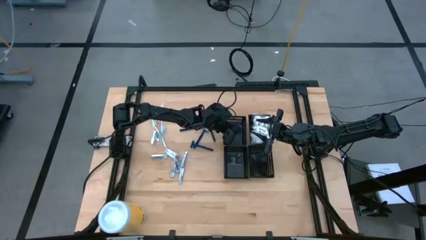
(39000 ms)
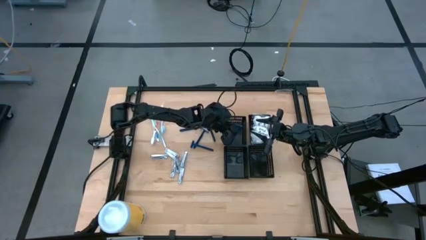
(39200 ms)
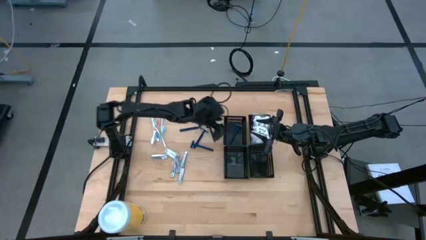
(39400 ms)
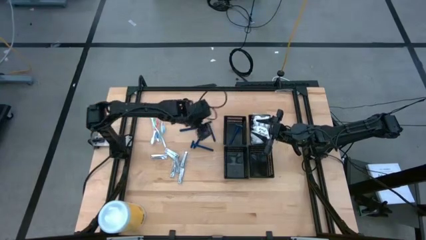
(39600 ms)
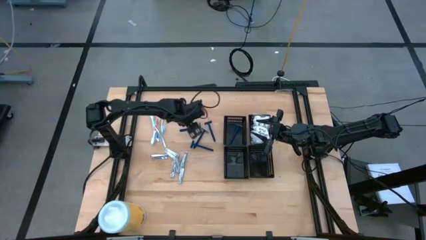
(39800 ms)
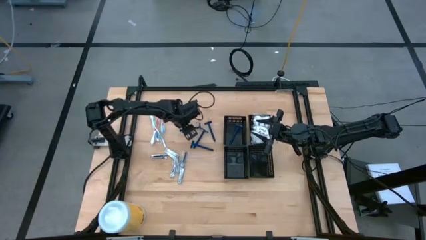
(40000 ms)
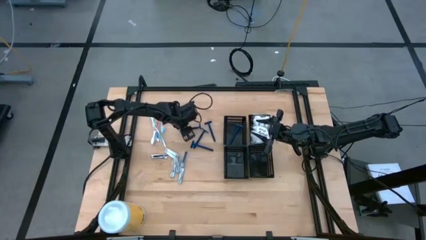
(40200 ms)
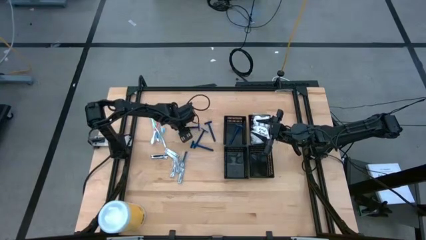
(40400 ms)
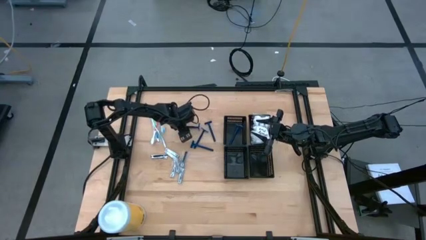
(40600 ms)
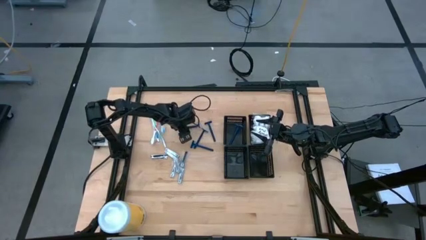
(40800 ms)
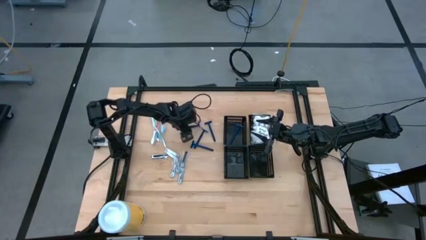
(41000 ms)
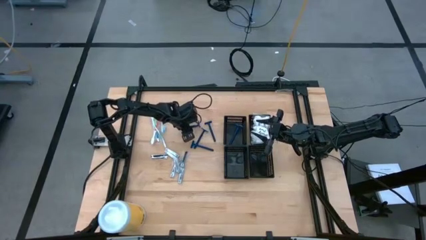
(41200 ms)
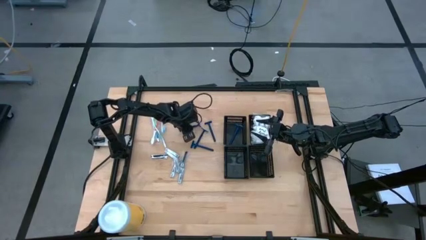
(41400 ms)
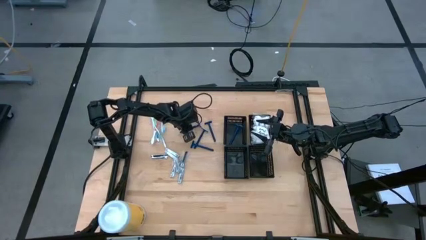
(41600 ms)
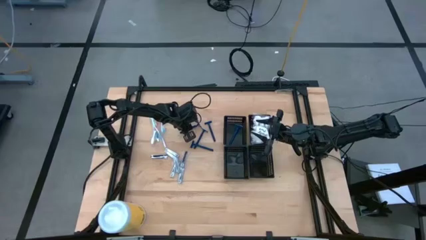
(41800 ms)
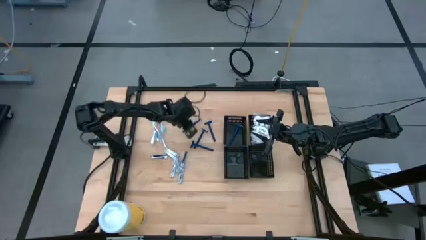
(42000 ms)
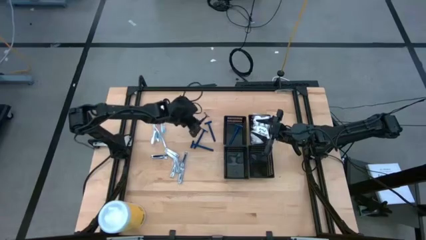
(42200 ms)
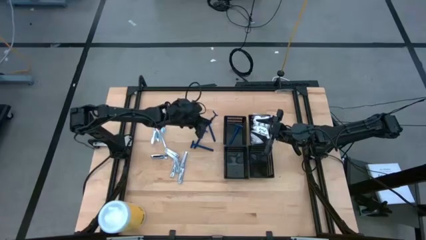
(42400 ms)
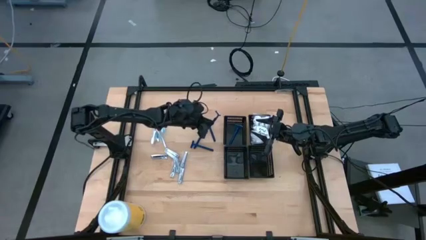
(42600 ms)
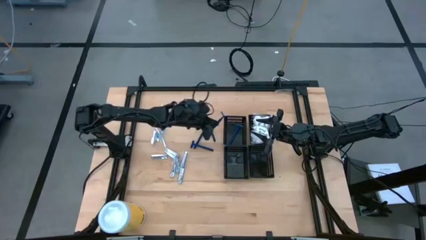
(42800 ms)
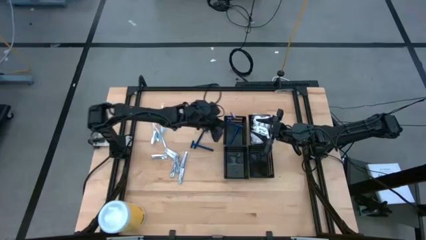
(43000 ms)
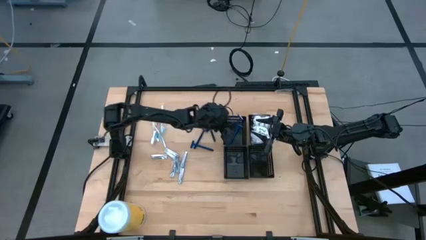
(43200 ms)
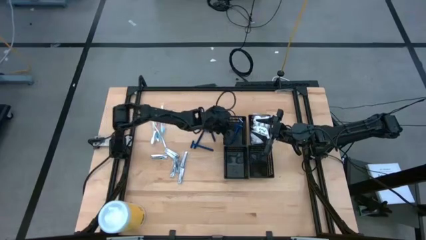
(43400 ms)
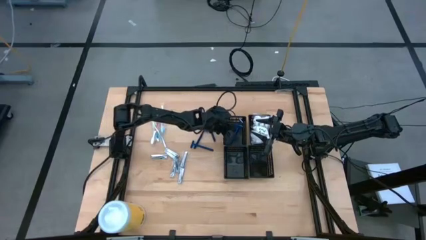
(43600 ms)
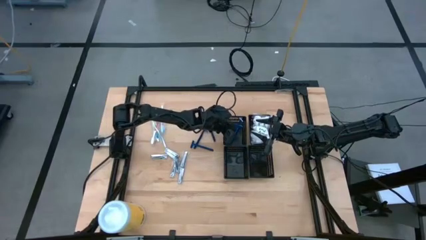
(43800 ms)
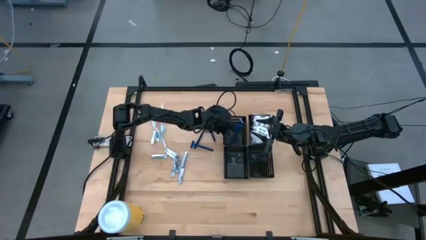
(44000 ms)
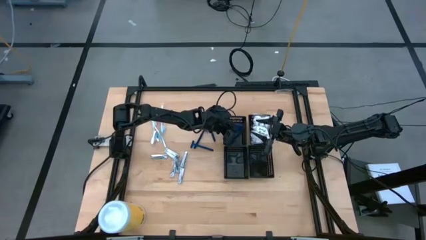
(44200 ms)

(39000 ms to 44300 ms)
Task: Pick & Place Travel size toiletries
Put the razor into the top left black basket

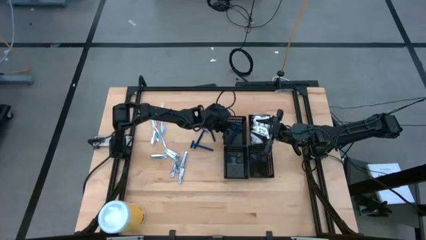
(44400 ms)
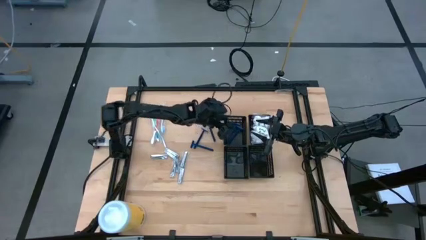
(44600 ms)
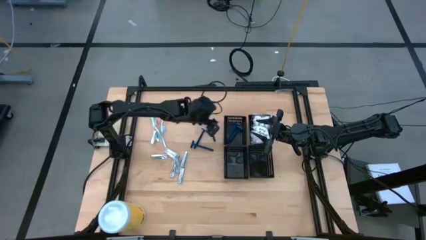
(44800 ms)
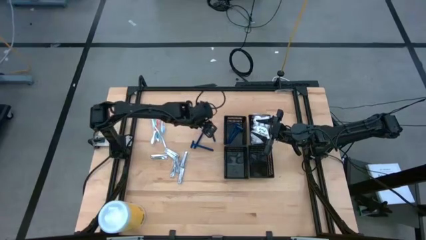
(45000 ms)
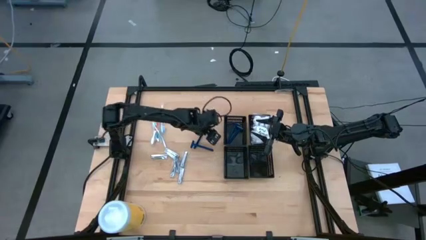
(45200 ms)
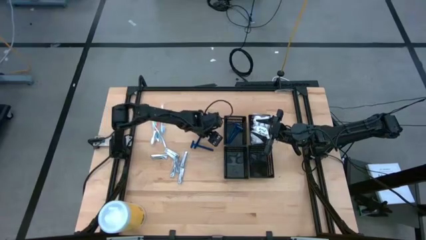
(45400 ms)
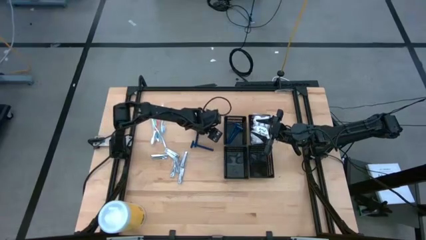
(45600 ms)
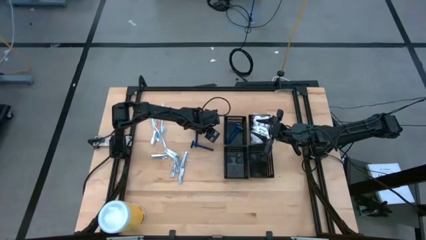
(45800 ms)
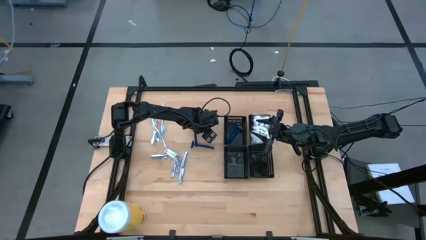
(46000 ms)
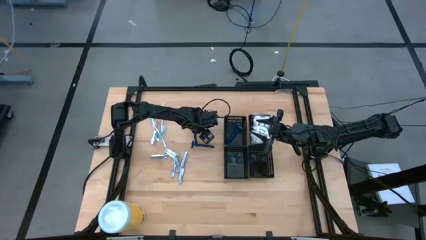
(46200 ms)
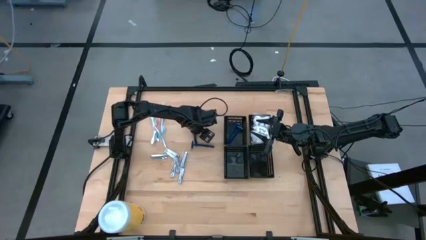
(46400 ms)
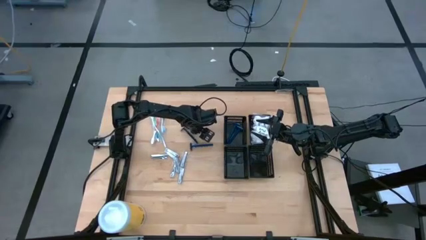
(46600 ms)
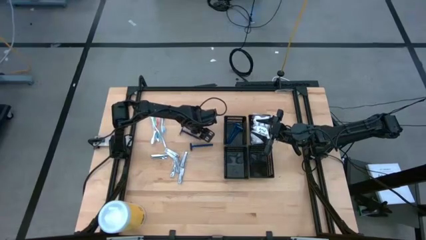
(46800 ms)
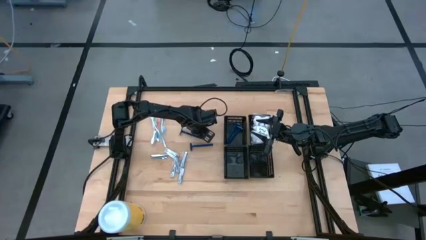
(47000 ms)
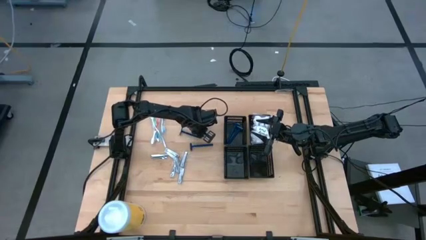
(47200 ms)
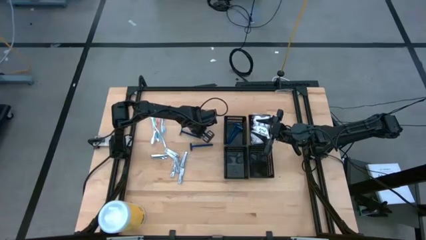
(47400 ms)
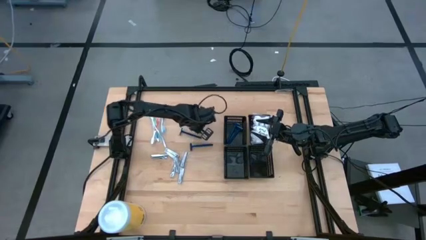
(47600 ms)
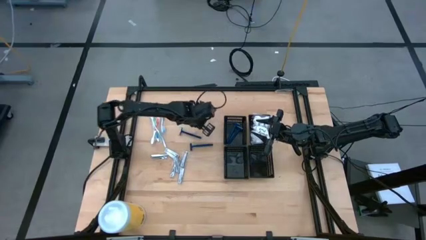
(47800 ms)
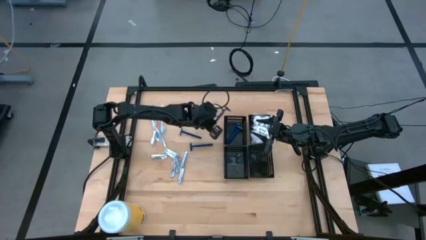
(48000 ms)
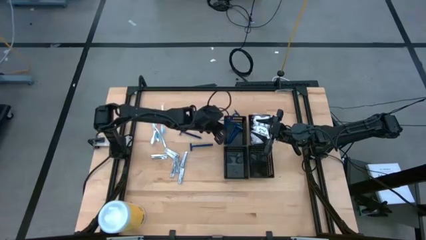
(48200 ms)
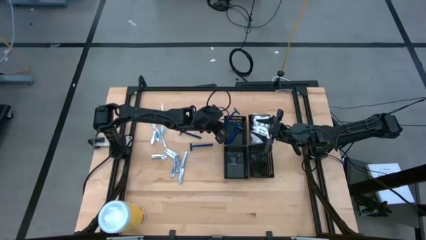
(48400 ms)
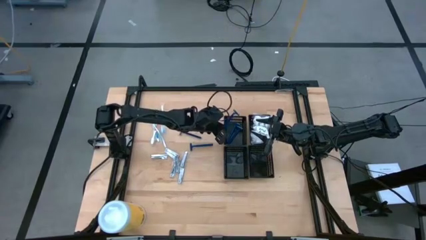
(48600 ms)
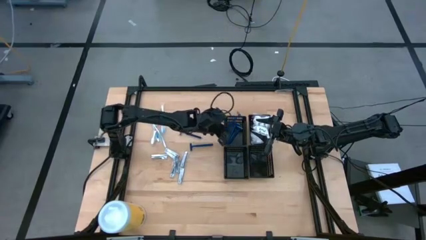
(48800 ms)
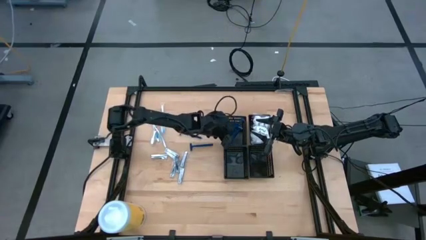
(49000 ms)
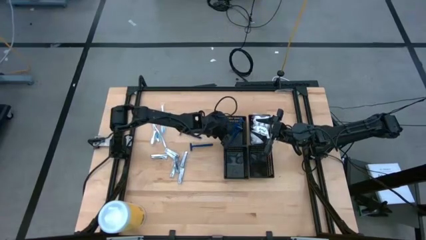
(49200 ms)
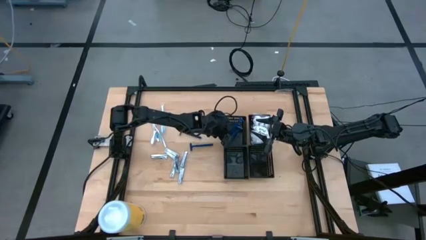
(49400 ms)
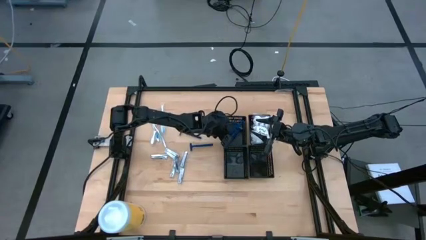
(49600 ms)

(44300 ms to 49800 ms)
Put the razor into the top left black basket

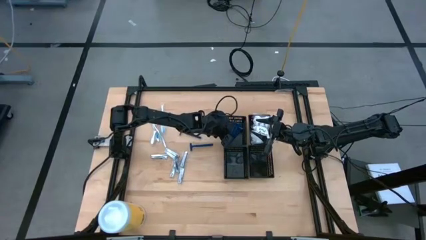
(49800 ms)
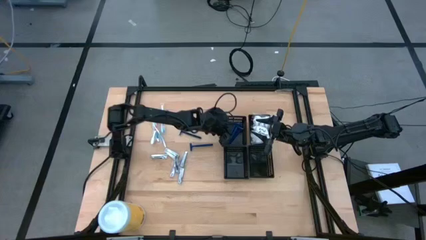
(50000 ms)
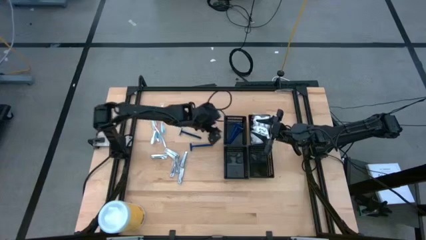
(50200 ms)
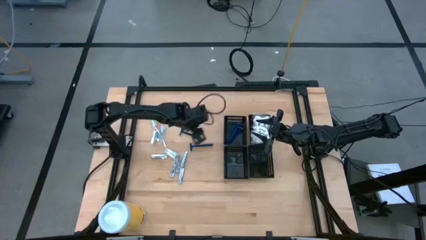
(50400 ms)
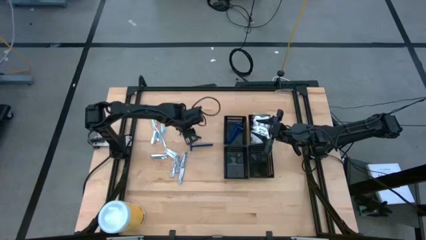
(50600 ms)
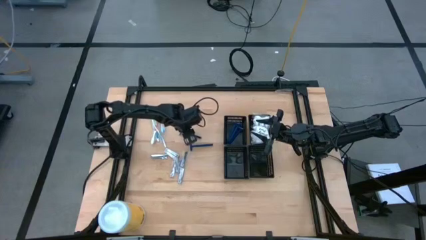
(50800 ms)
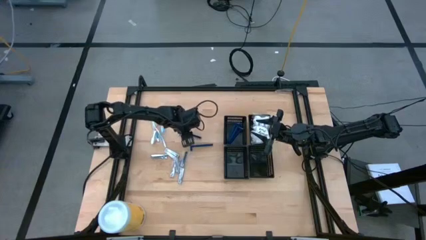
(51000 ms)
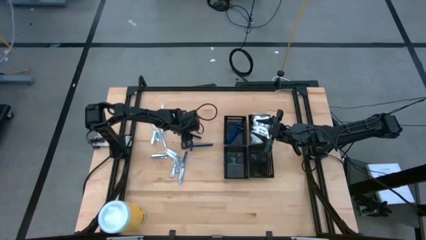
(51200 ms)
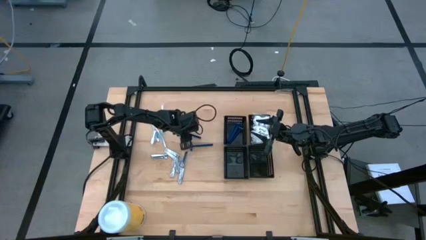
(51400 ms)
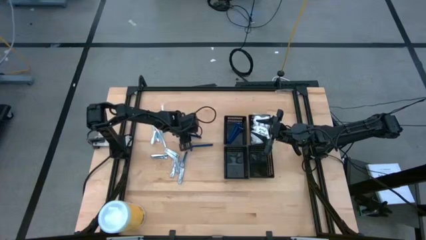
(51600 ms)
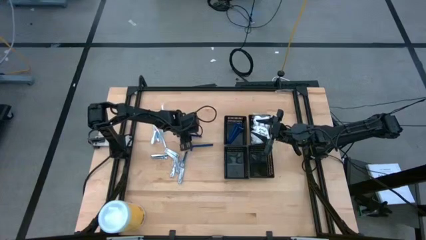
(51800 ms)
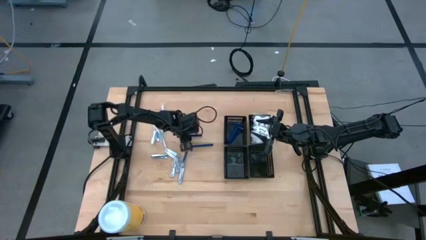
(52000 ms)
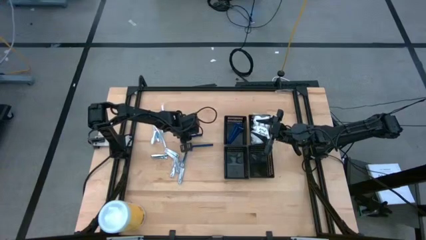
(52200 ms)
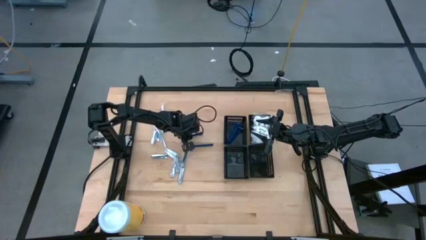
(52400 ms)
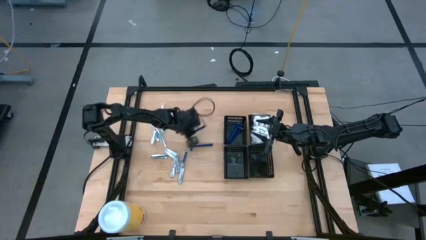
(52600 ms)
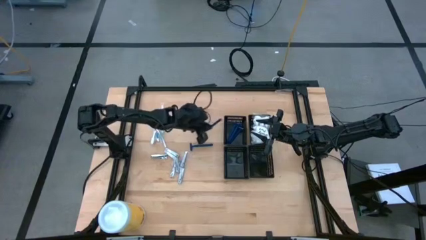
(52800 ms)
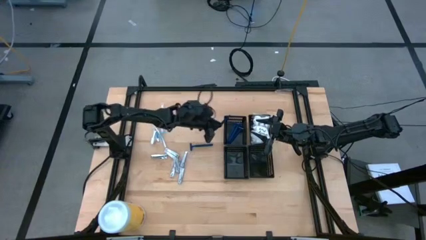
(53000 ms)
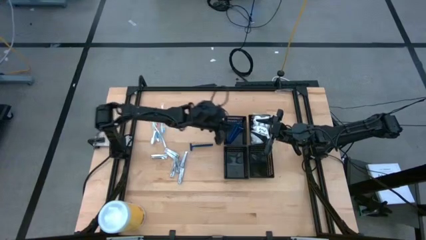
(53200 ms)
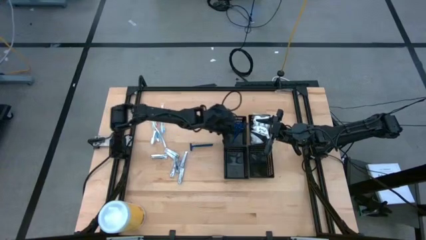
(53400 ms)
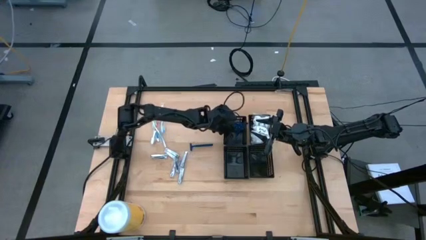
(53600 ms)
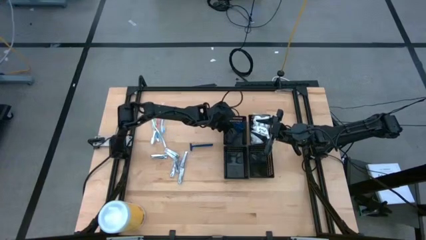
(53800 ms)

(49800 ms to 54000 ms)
Put the razor into the top left black basket

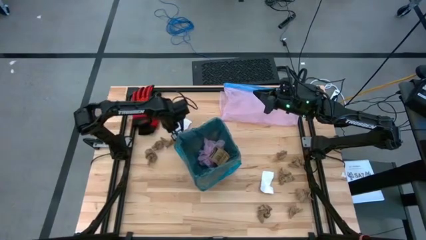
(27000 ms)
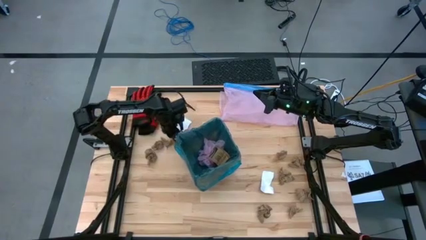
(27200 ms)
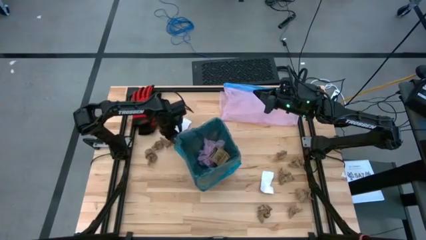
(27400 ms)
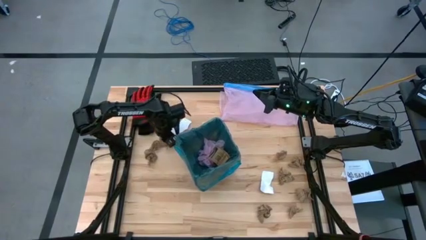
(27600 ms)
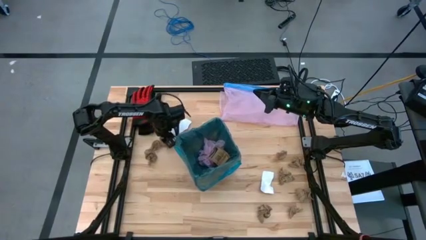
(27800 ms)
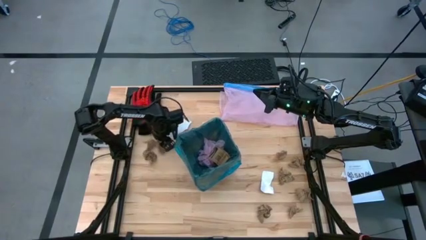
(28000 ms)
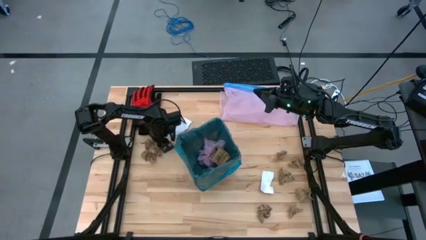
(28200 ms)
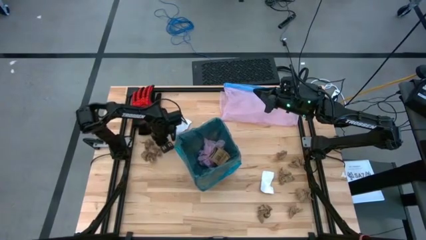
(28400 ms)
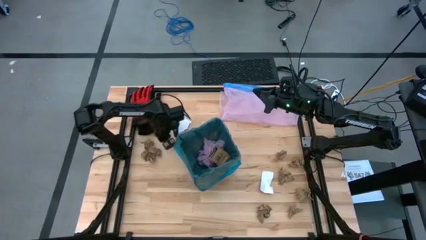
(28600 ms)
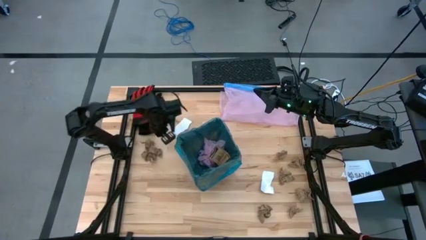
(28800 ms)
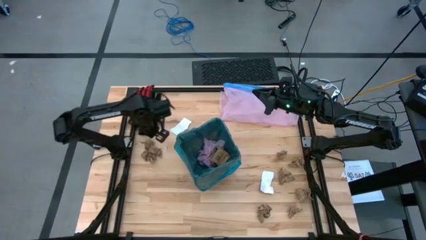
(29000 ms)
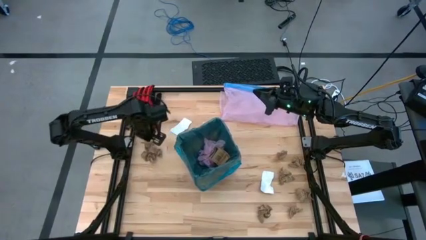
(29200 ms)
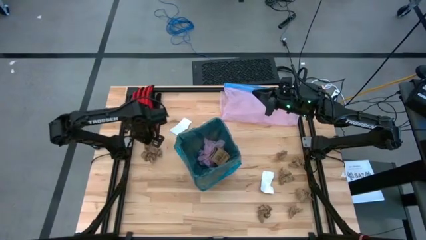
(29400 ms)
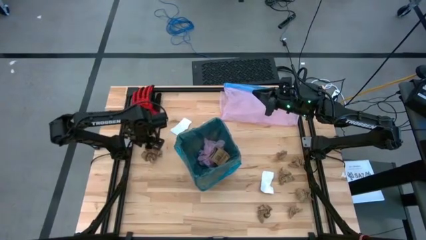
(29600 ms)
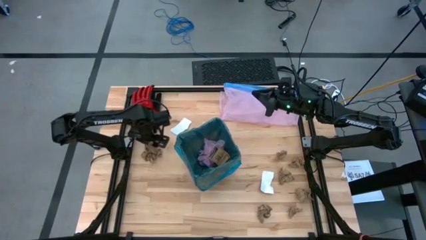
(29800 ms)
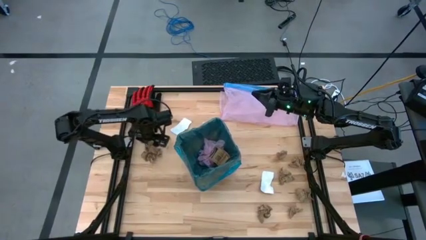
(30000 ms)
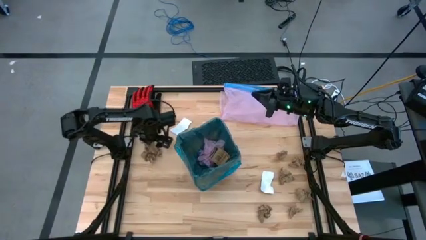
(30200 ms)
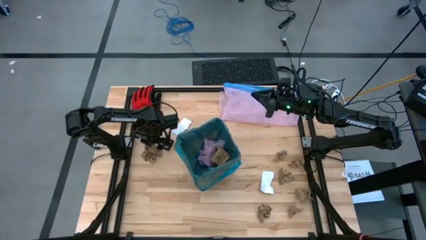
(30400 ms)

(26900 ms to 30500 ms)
Task: place trash/remove bag and relplace
Put the brown napkin into the black trash bin
